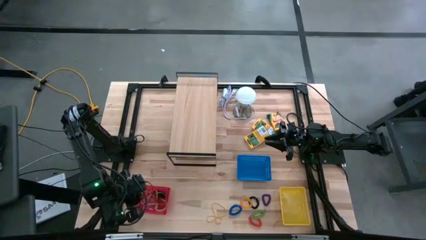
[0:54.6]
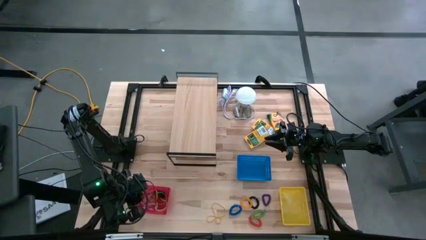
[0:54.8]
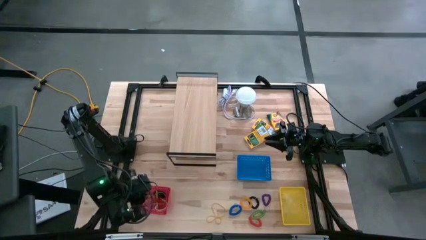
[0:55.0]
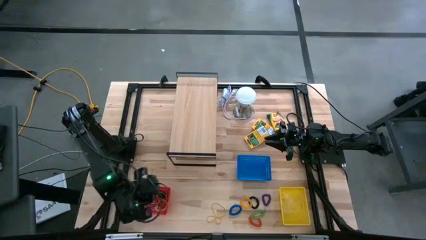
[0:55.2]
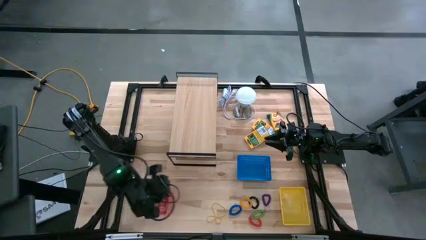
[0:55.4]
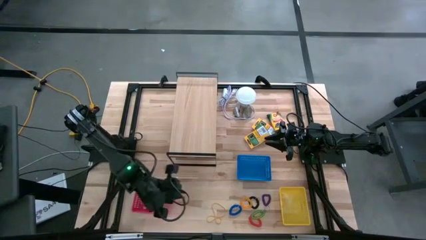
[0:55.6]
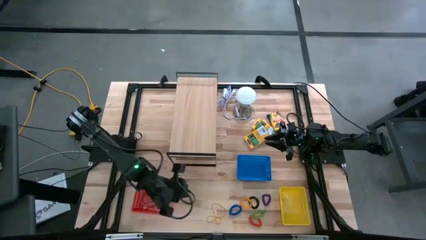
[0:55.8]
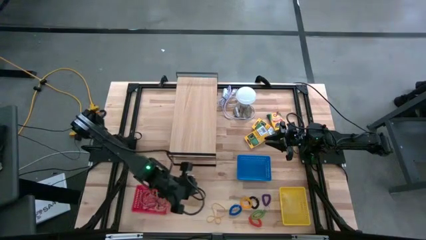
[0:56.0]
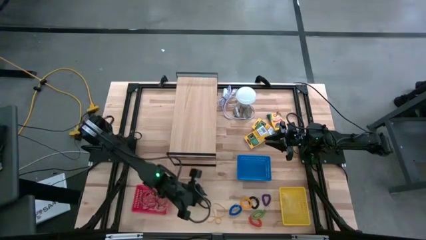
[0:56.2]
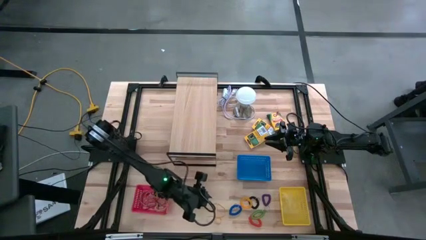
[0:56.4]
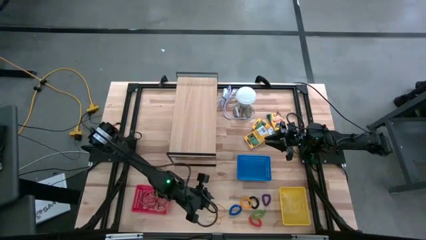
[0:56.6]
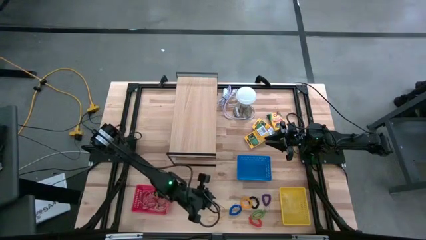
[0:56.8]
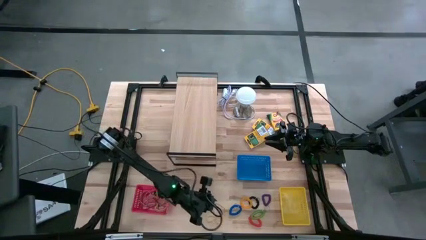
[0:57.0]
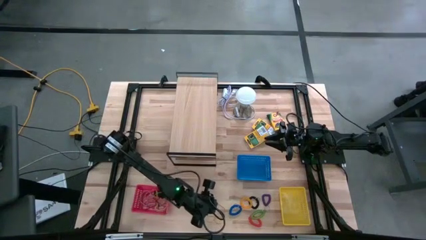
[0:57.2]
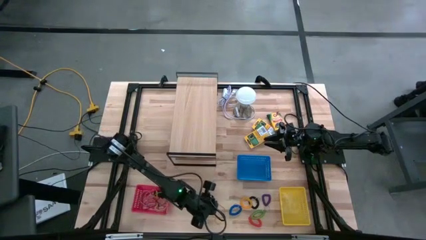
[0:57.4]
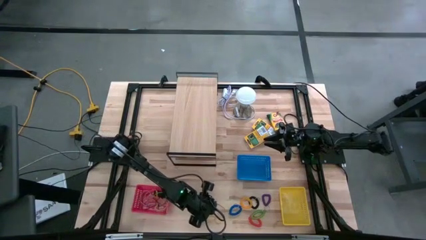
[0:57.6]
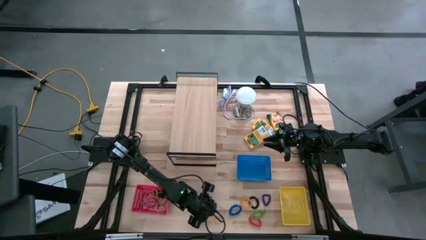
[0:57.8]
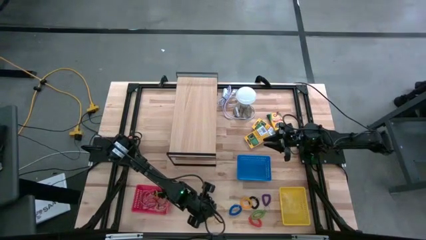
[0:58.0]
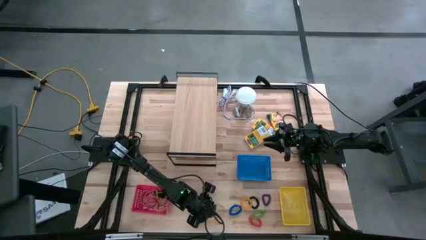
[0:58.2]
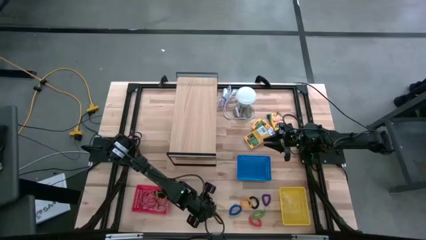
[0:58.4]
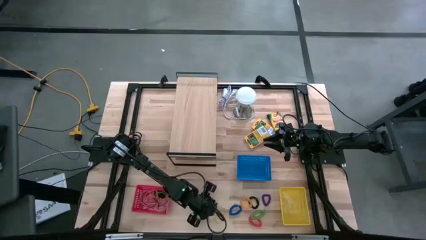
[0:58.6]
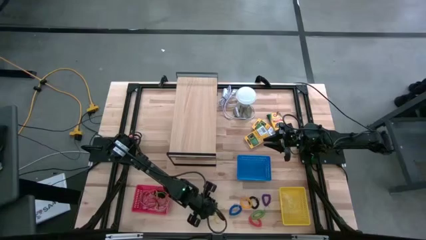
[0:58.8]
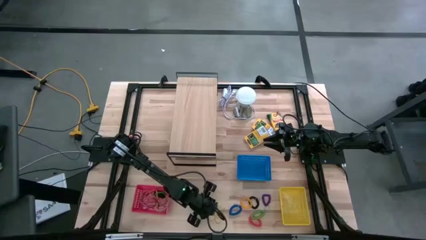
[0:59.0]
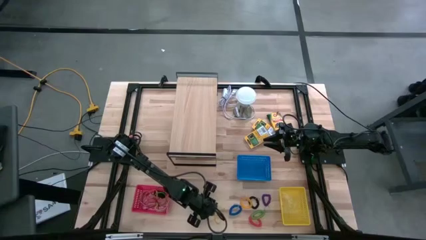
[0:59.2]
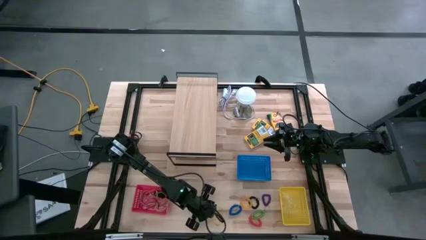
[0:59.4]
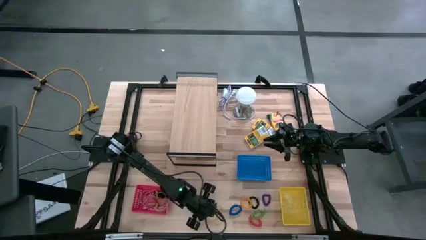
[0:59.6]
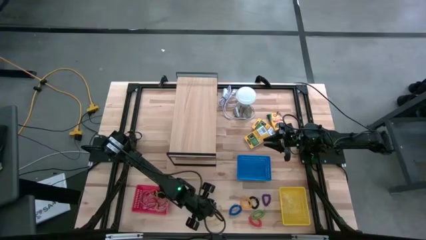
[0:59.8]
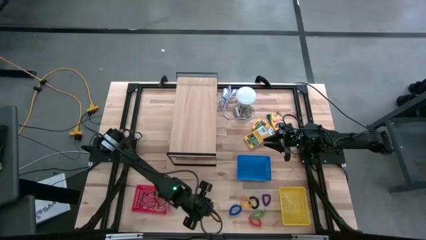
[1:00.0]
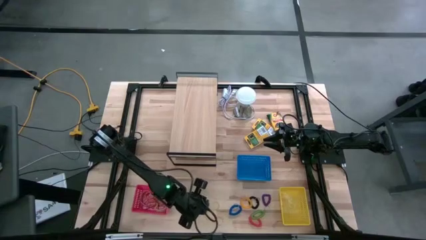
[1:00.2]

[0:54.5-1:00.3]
Task: Pick & Place Office Desk Supplies
Put the yellow rubber band into the red bin

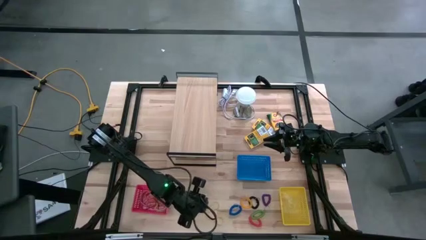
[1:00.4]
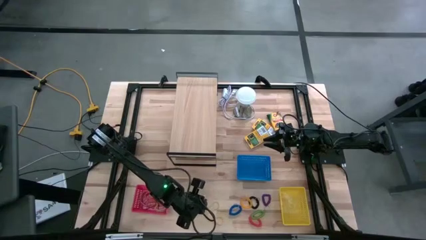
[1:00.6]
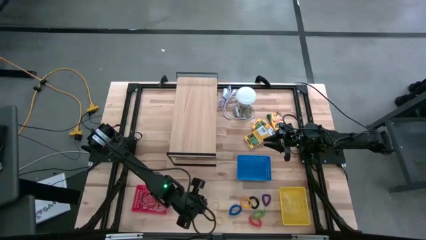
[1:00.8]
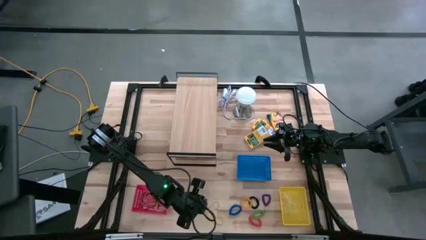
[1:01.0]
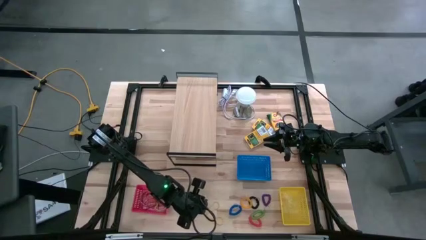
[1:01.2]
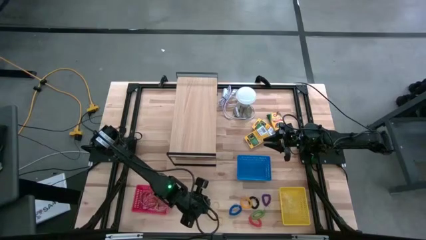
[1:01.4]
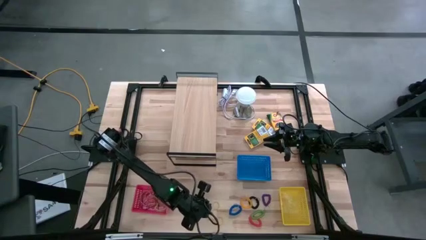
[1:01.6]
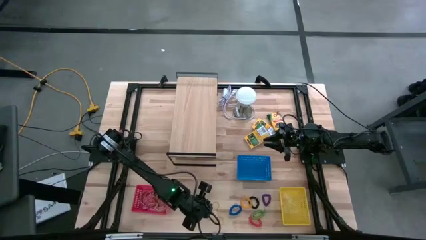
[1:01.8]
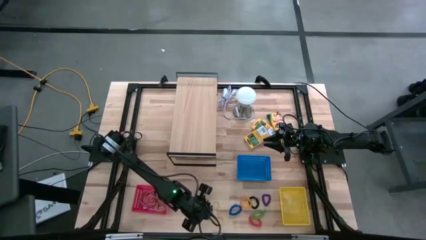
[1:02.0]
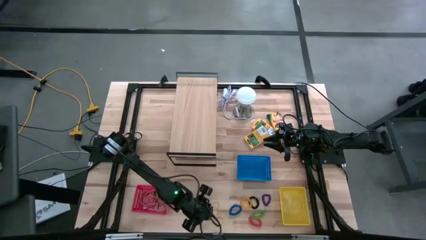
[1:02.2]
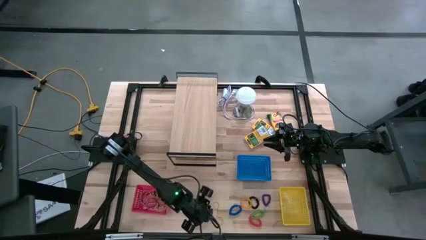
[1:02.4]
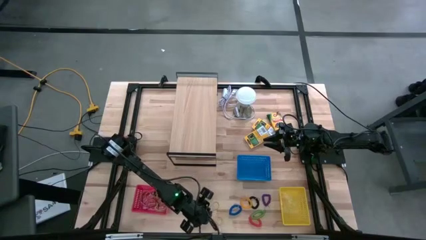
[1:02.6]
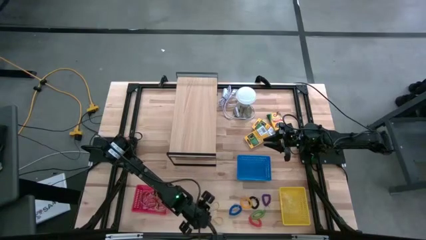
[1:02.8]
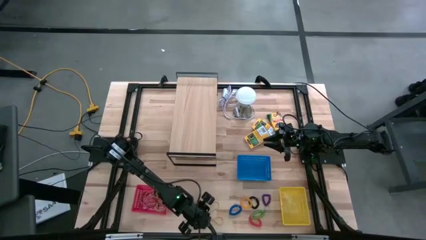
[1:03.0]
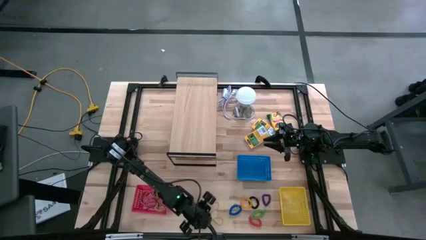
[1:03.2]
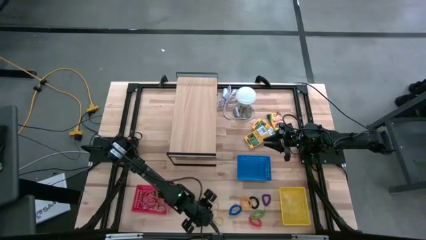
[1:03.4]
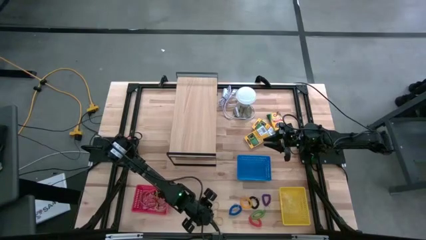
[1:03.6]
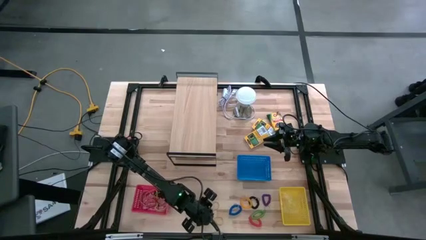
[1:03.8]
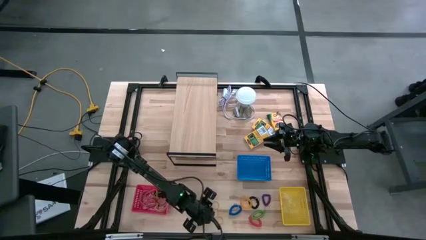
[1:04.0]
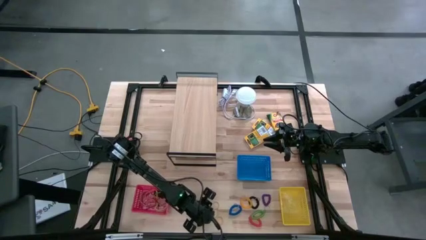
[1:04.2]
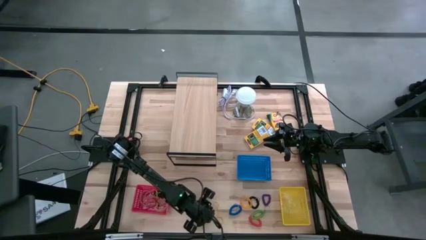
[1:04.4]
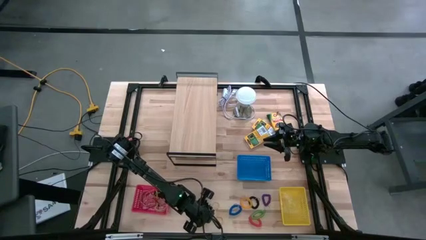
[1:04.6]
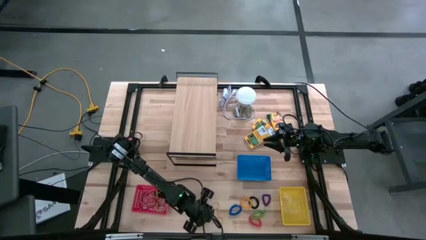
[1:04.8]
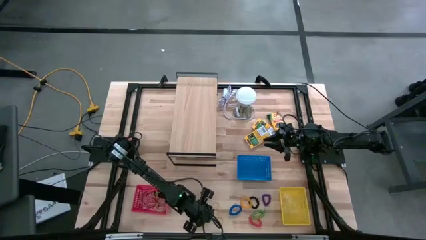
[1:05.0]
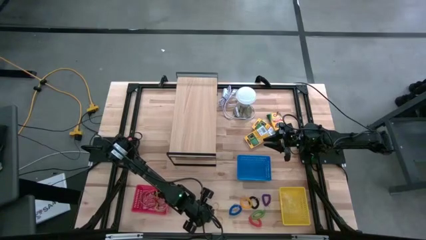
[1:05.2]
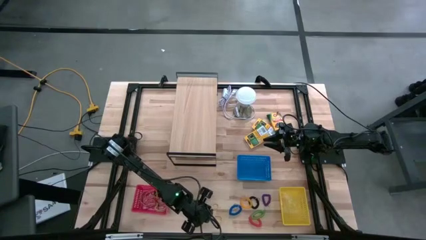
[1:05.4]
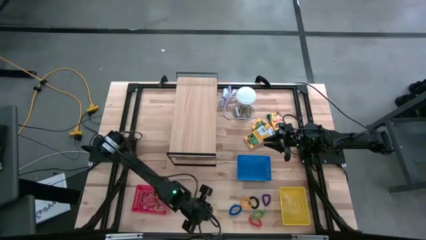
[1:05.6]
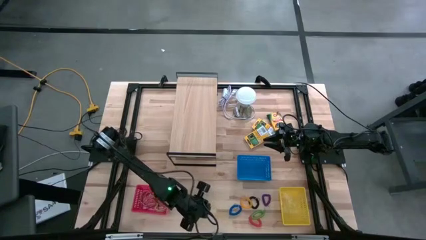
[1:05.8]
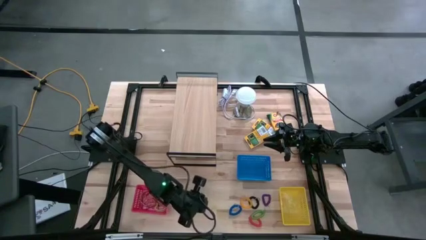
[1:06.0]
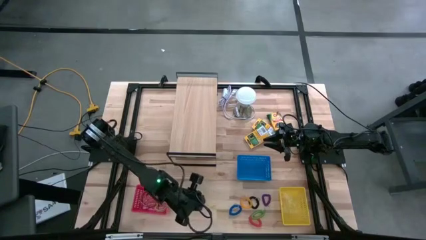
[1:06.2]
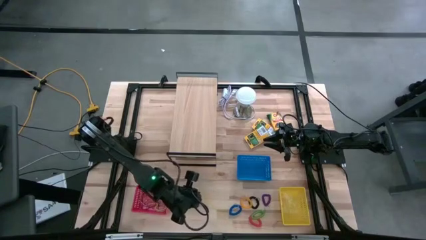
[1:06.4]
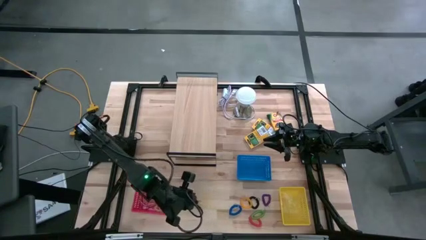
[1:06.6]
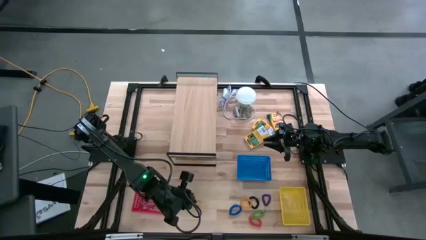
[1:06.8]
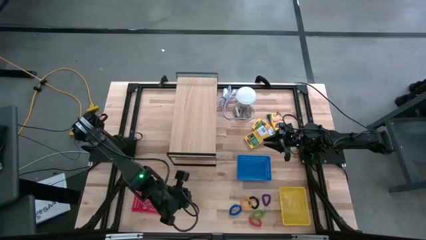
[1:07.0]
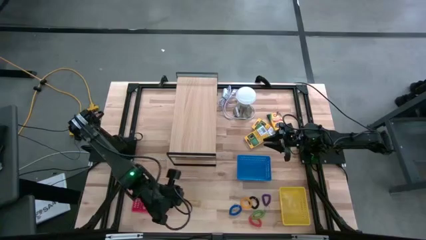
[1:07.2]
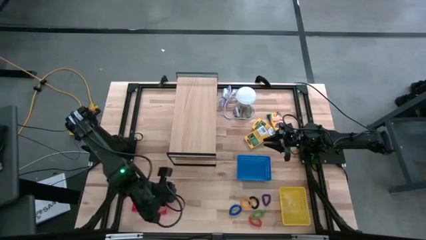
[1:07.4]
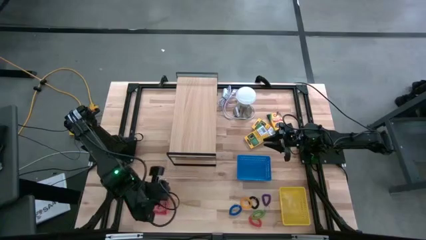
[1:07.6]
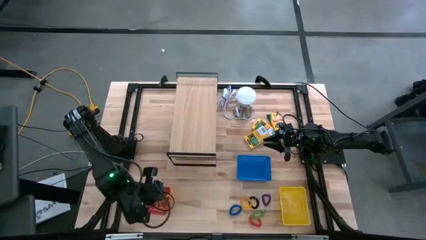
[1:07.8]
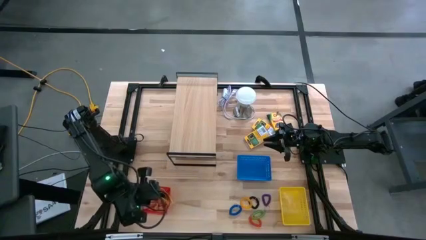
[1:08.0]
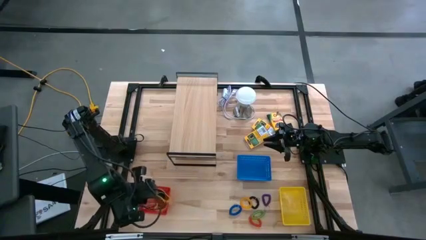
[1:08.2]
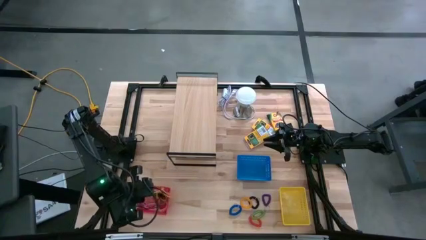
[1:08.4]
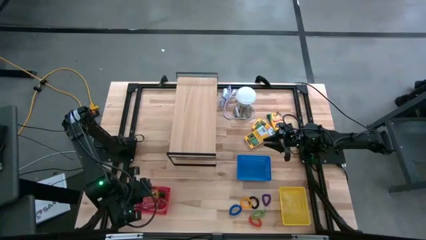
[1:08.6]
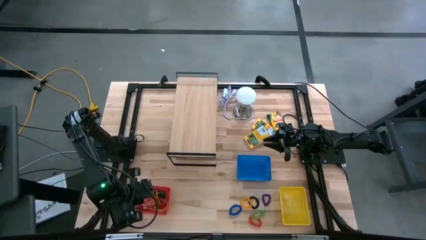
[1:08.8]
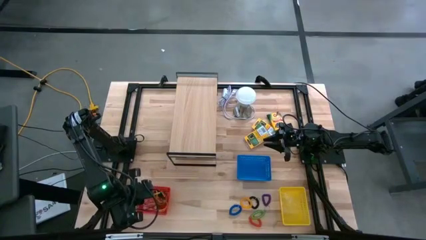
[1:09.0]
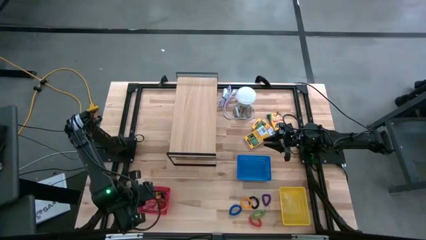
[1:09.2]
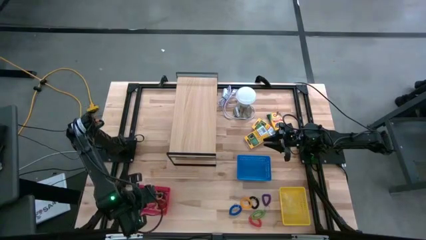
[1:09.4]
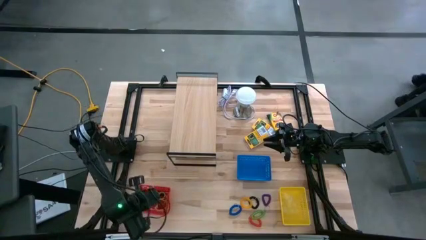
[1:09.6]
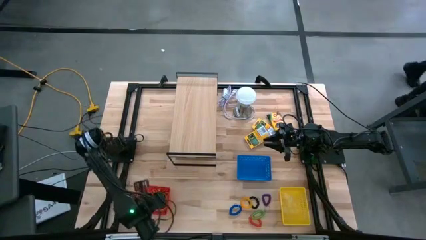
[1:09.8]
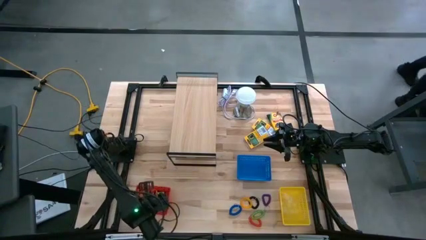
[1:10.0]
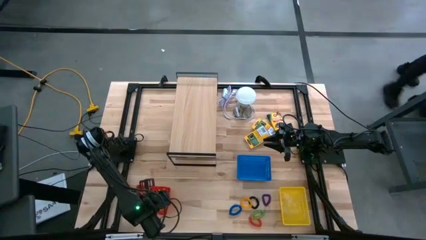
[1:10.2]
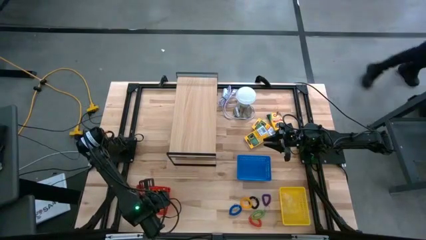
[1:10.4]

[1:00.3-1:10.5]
Put the yellow rubber band into the red bin

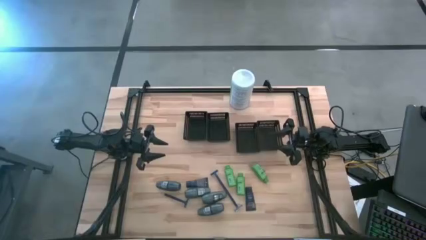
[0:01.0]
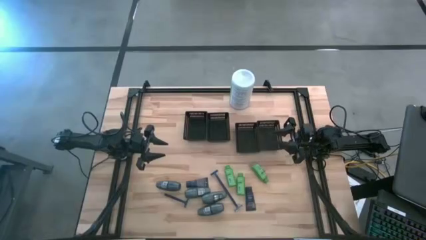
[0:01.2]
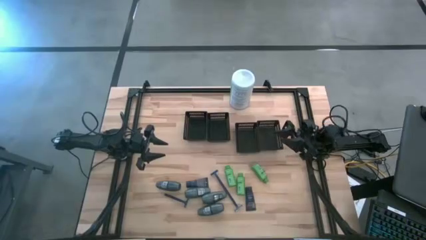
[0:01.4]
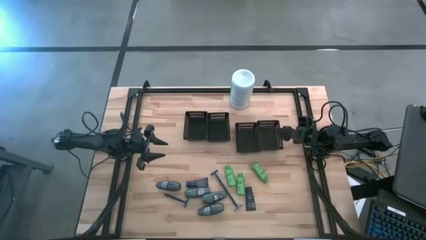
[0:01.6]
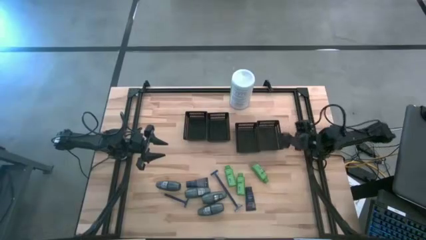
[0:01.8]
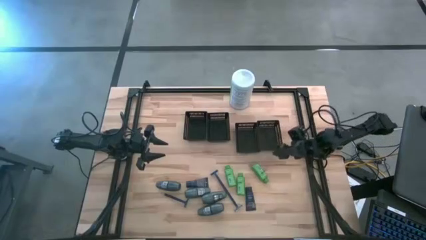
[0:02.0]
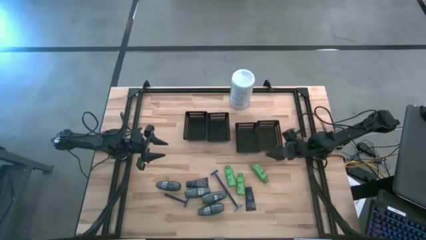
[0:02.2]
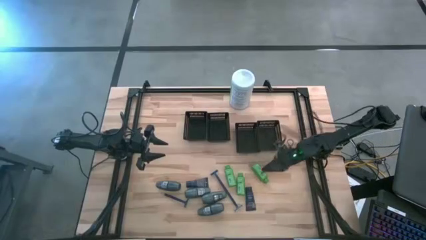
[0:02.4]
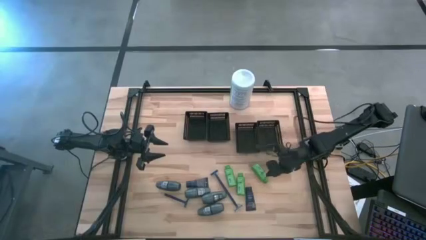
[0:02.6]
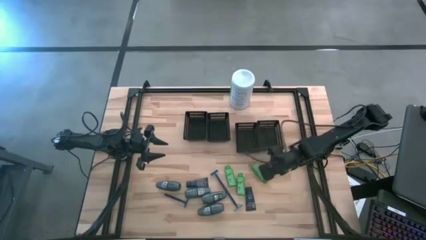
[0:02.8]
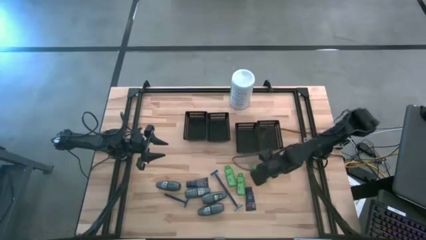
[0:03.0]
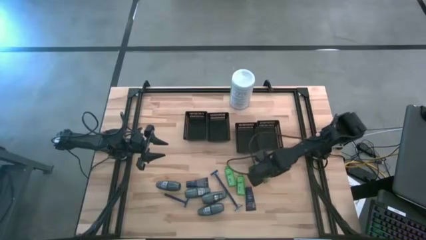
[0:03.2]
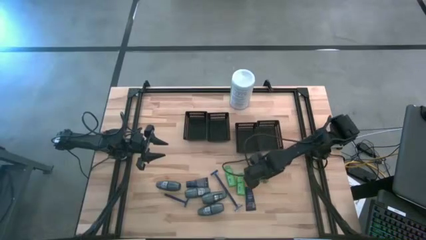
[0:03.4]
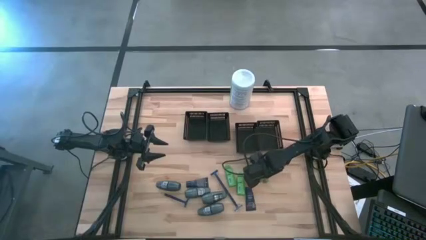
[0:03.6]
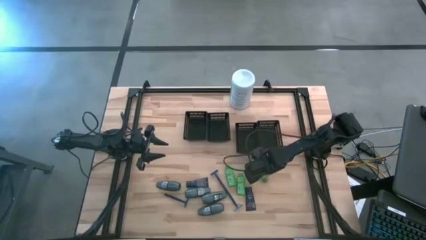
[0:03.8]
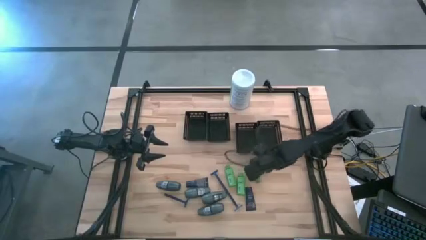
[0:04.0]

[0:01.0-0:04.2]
Task: Pick & Place Travel size toiletries
Put the green shampoo into the right black bin
